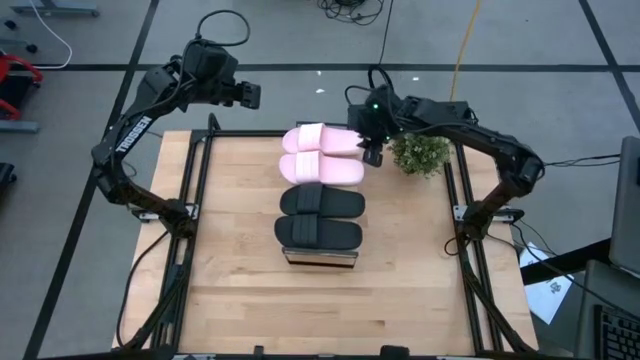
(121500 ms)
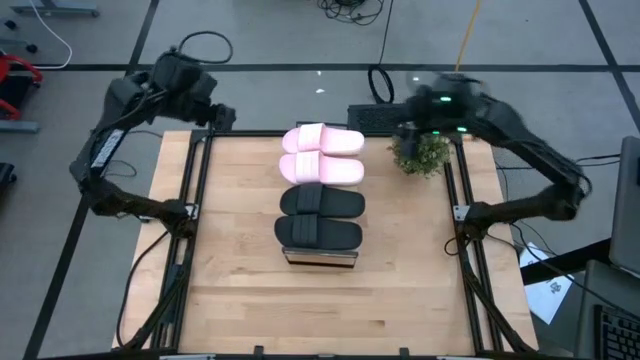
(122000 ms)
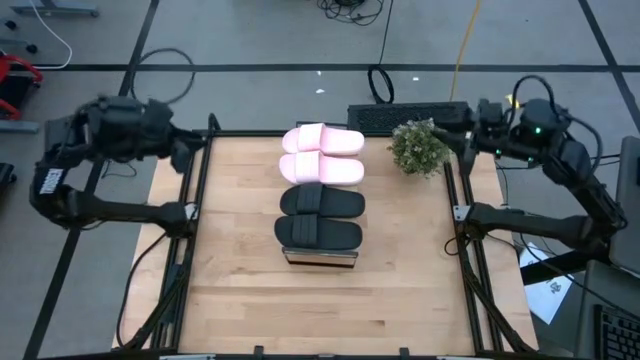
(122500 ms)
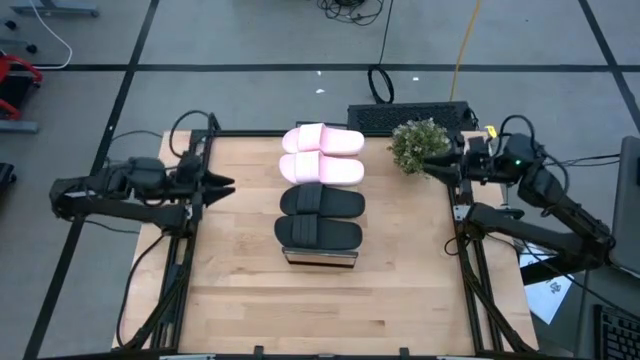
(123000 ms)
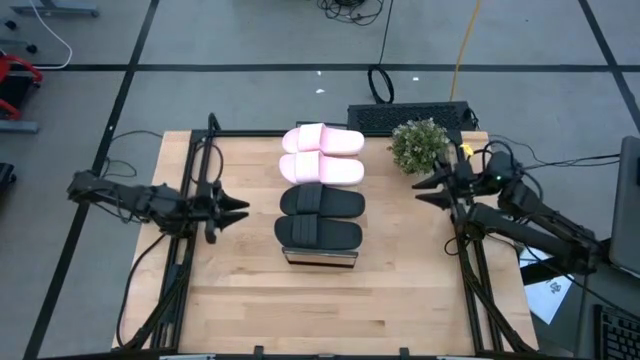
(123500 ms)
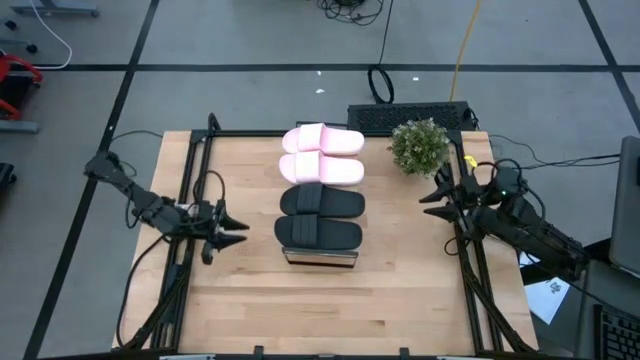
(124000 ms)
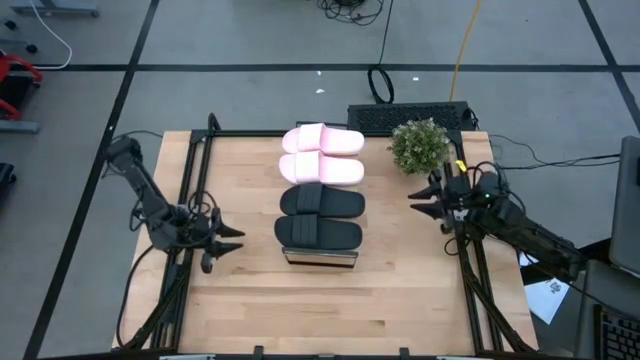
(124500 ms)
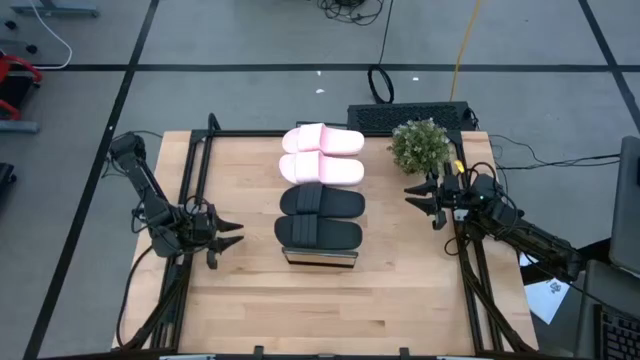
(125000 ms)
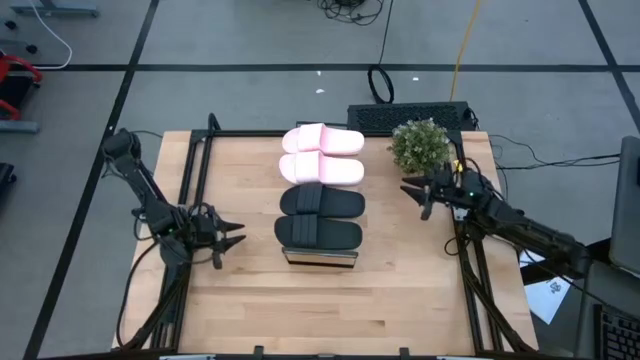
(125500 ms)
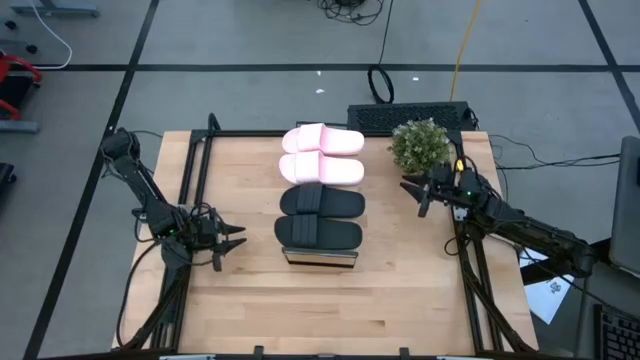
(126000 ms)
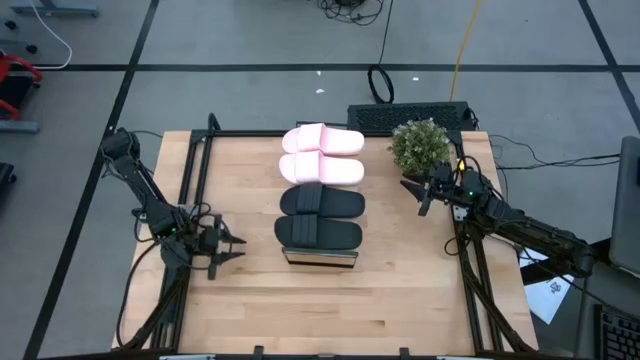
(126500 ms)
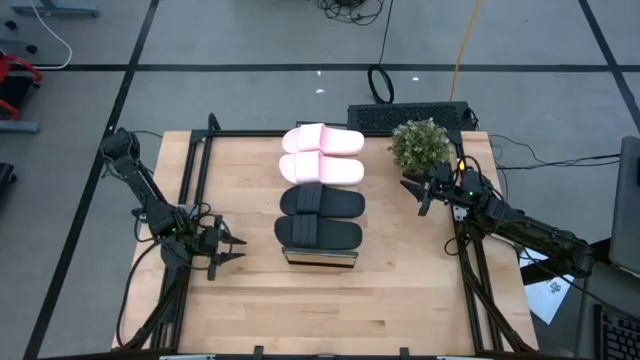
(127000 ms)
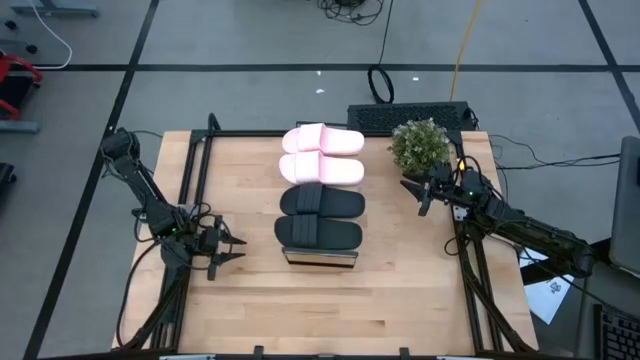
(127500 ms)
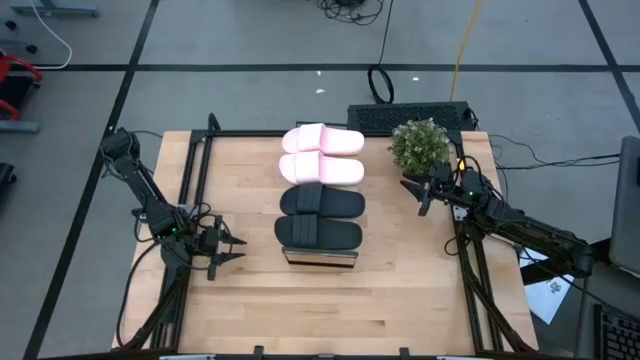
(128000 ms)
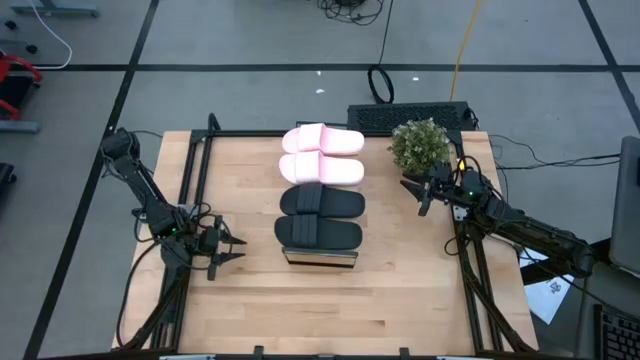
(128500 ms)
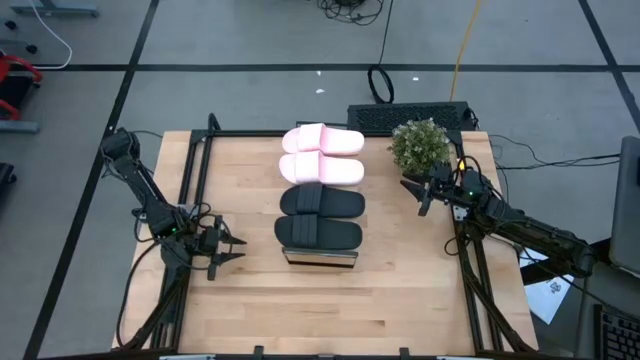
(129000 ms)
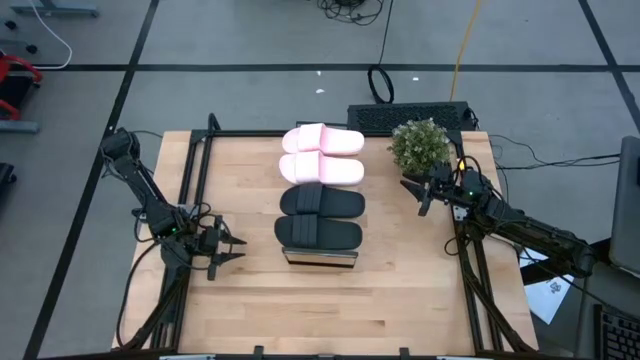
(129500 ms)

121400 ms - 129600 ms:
Task: Pick and place slides into the shelf
Return to Home Position

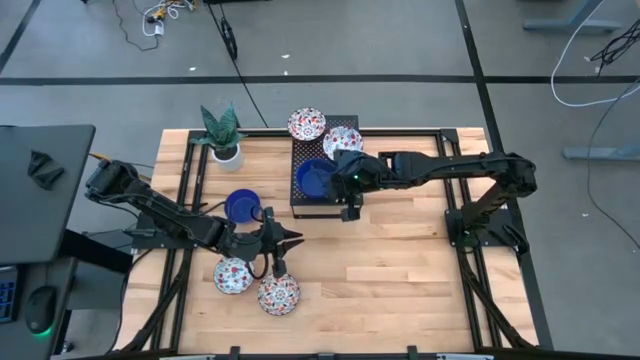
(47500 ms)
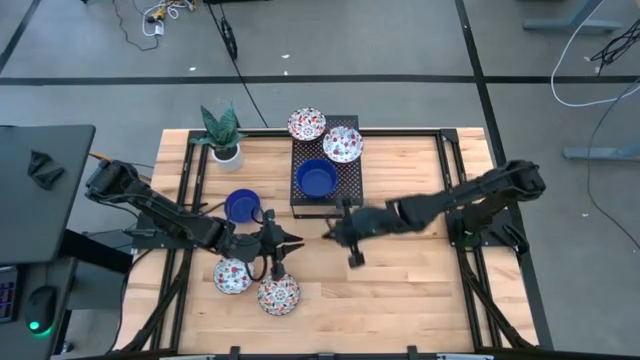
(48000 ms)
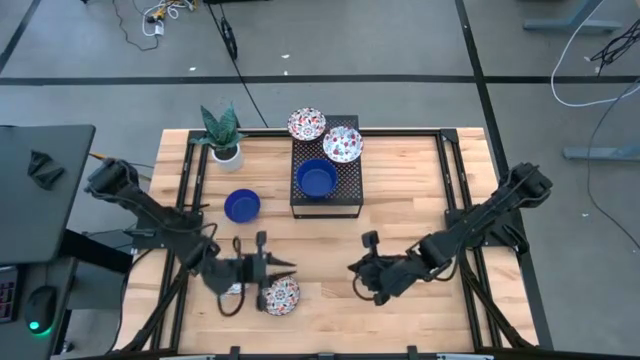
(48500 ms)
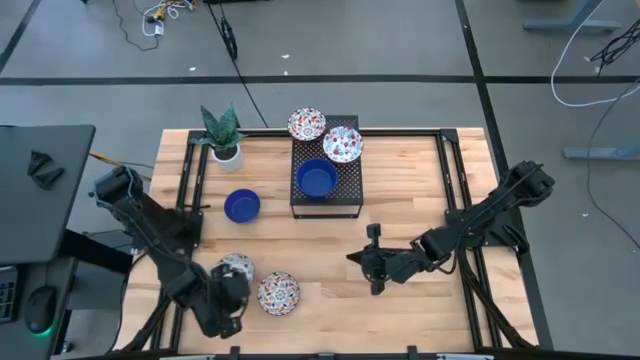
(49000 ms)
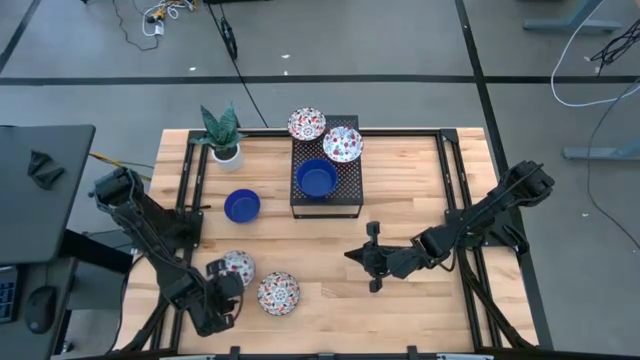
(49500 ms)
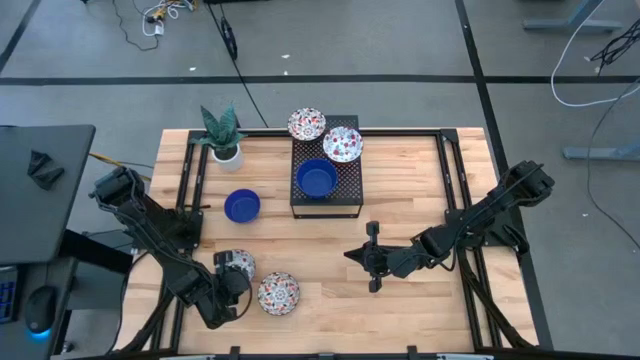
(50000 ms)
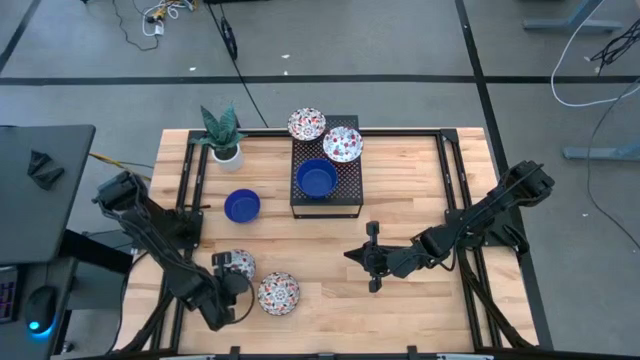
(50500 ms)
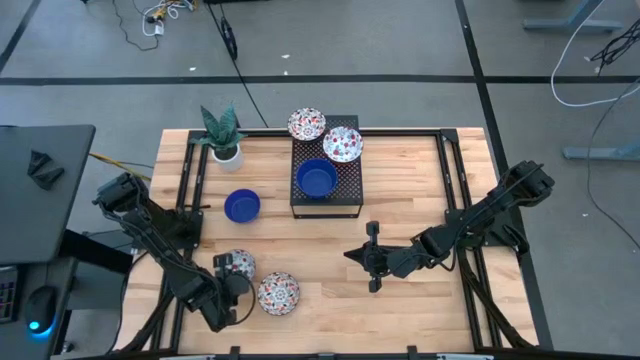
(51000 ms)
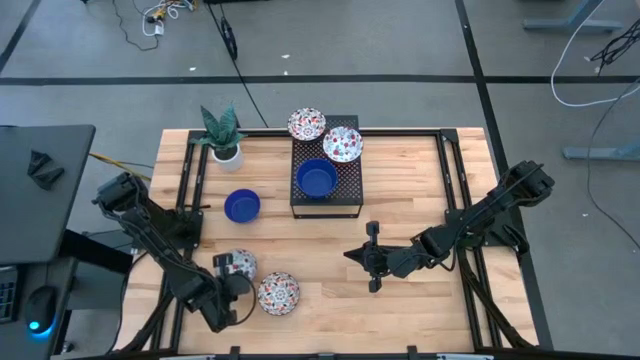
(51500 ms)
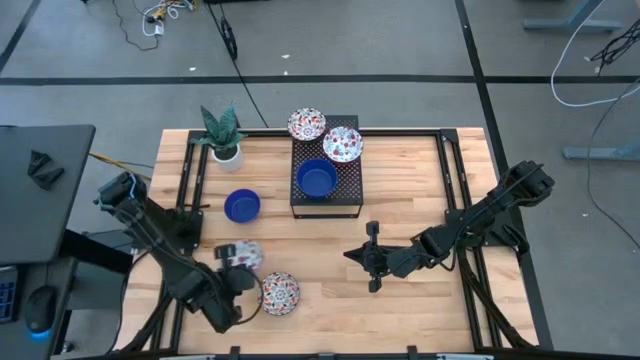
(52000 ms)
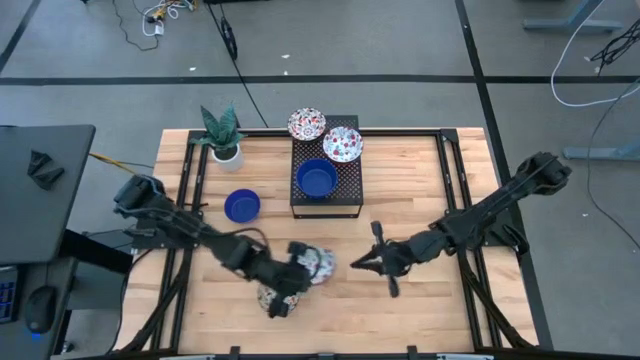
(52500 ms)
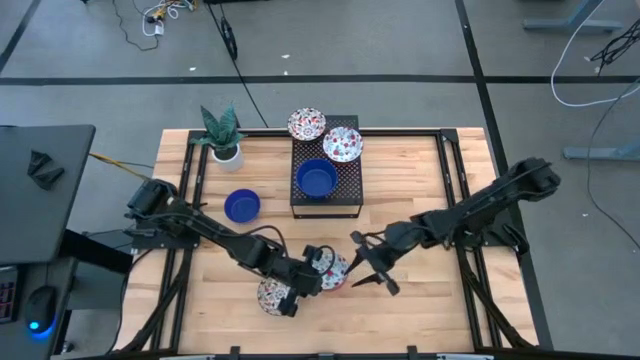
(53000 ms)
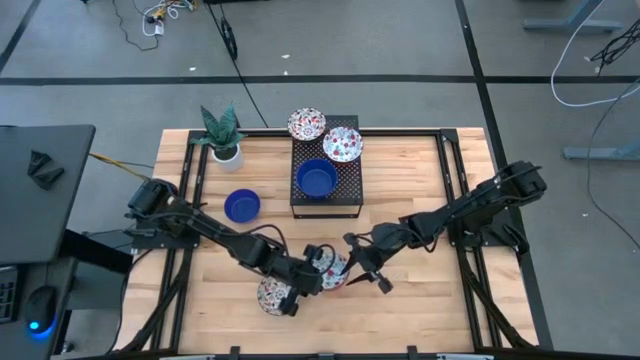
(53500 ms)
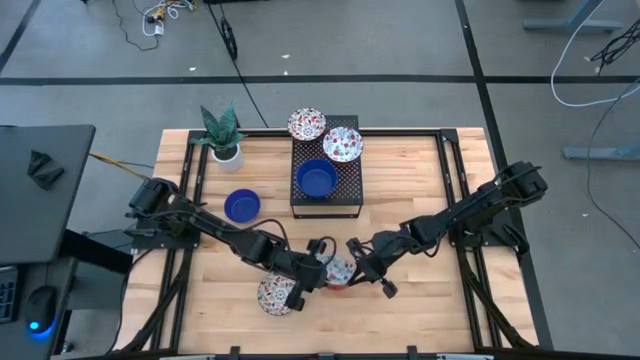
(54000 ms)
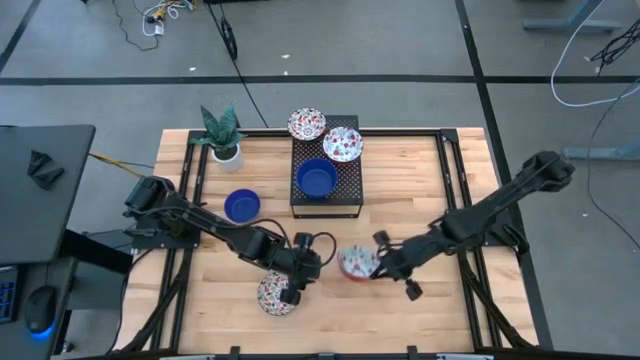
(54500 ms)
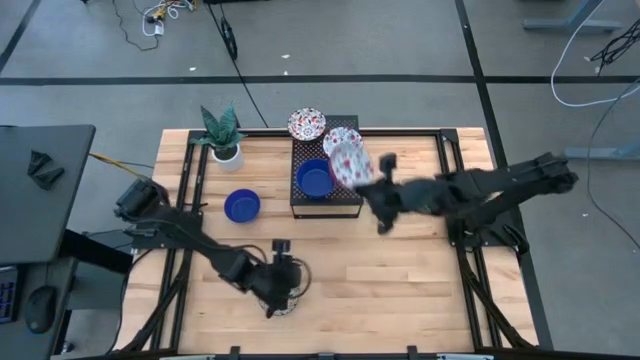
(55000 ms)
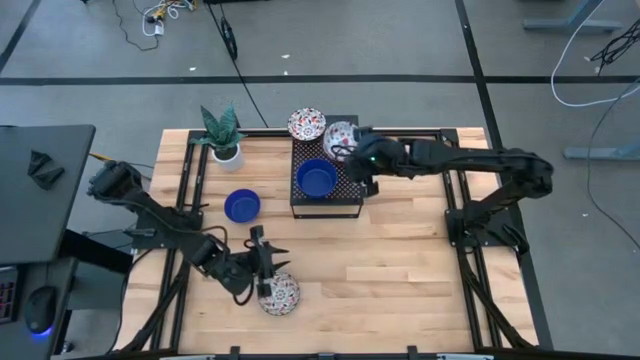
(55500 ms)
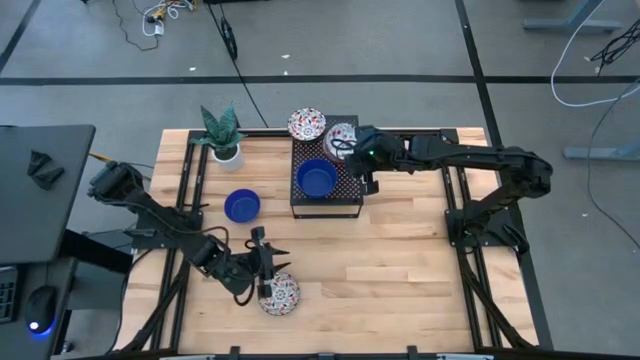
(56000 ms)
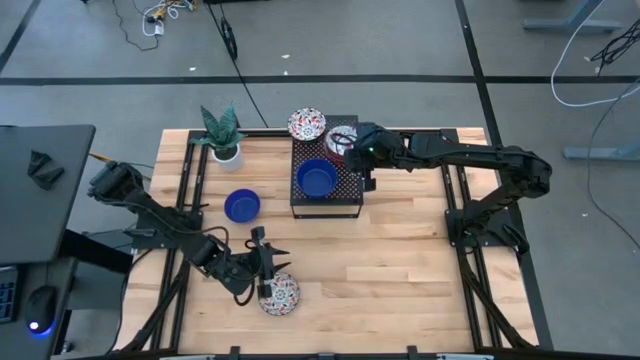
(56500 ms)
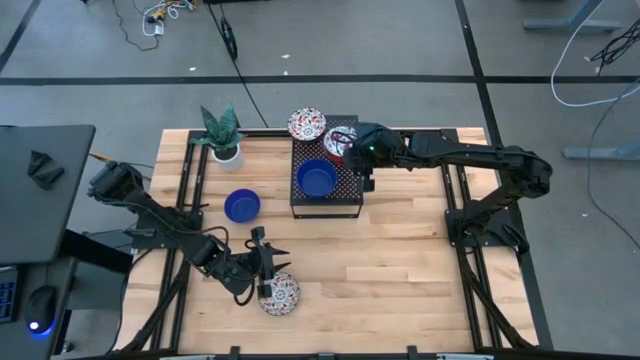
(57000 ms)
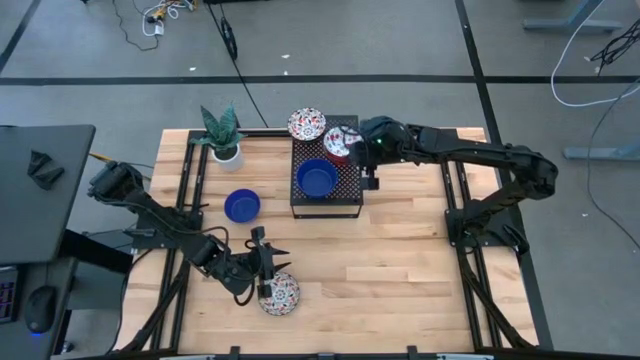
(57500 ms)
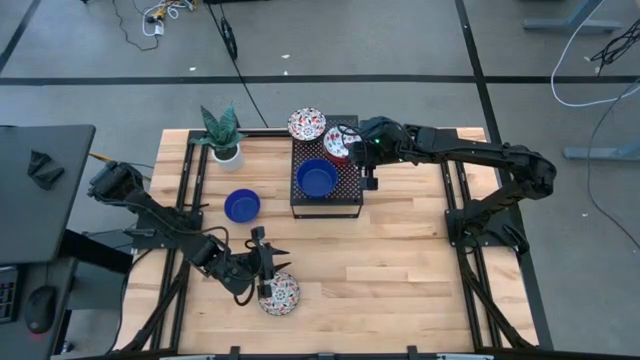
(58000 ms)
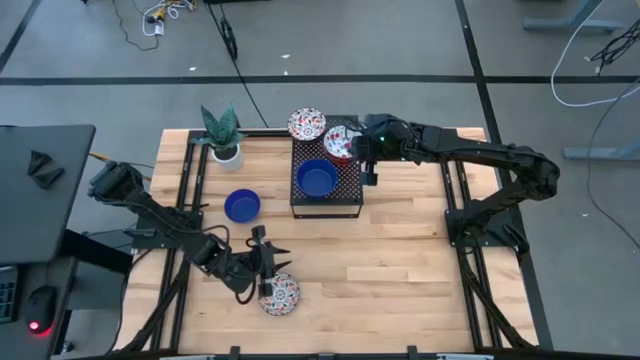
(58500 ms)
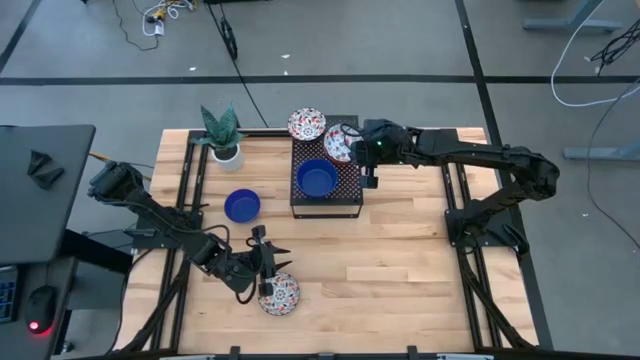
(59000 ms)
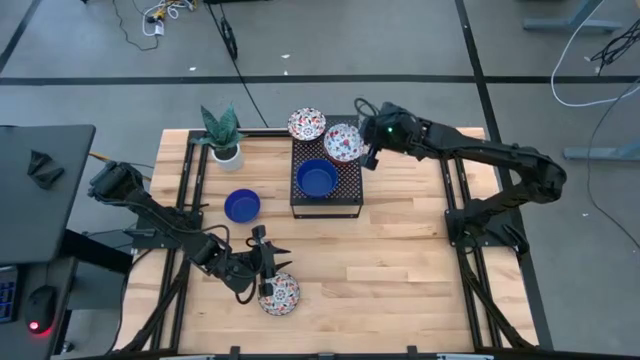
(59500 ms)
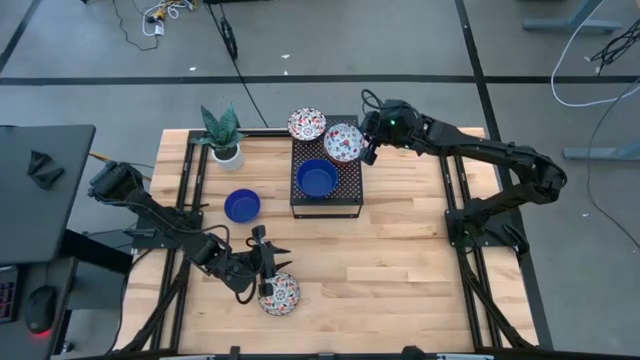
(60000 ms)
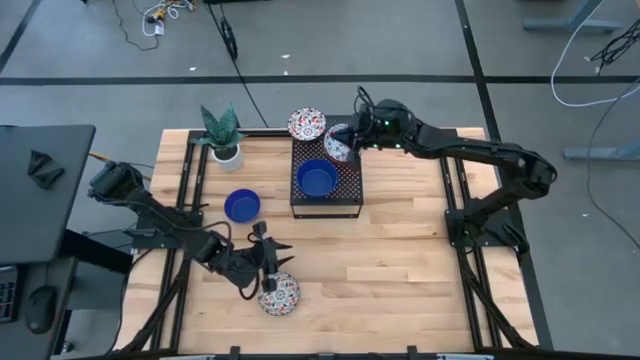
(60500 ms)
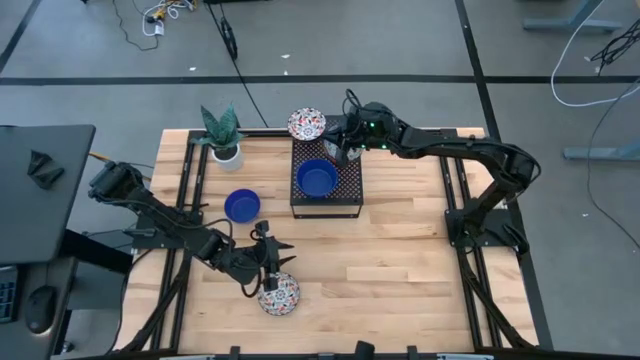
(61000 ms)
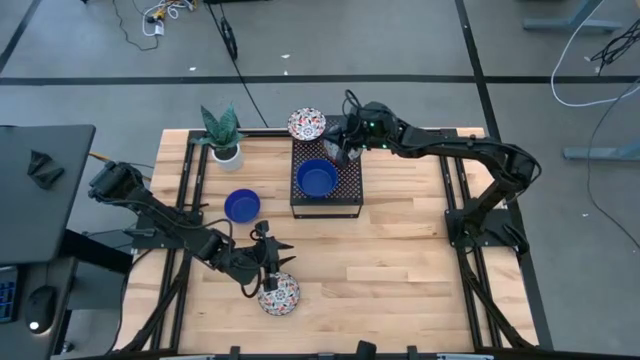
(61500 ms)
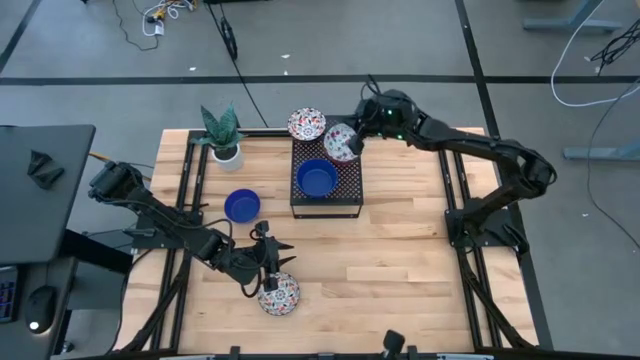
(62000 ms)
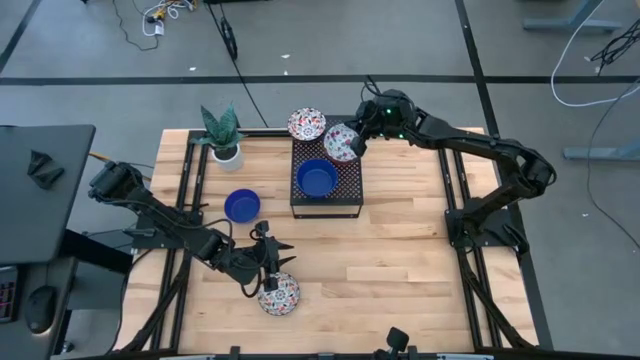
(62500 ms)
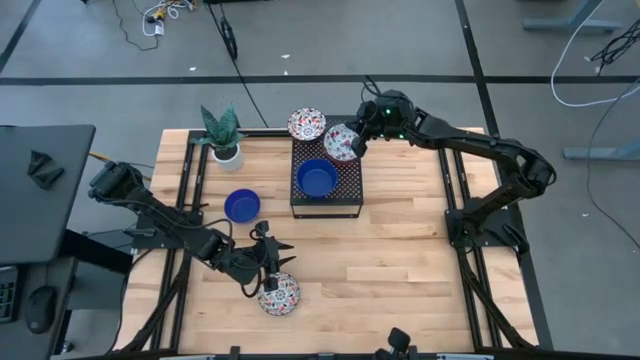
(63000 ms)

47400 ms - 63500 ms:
Task: Pick & Place Mini bowls
Stack the red patterned bowl on top of the other red patterned bowls on the shelf
